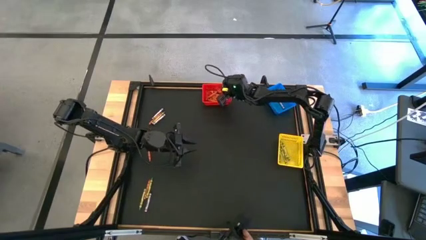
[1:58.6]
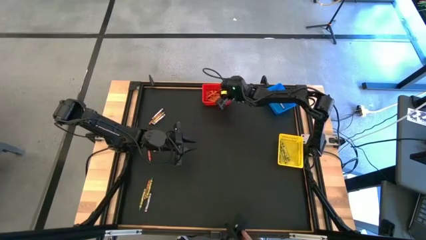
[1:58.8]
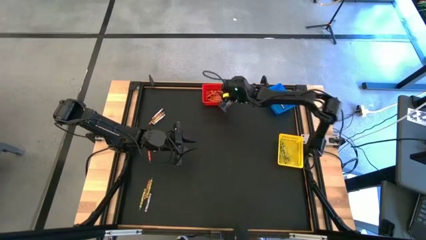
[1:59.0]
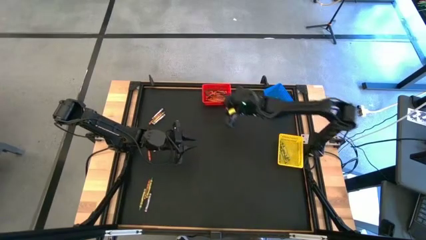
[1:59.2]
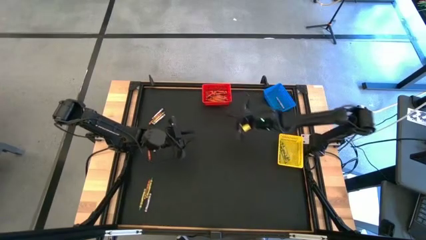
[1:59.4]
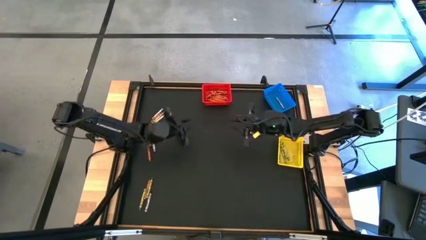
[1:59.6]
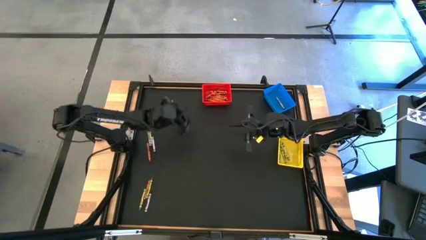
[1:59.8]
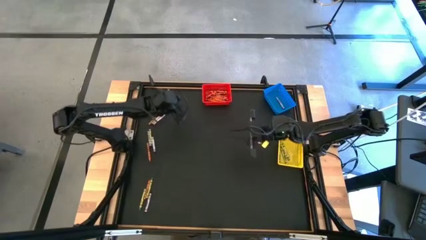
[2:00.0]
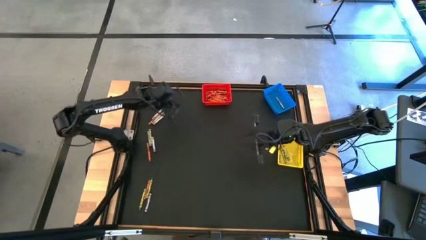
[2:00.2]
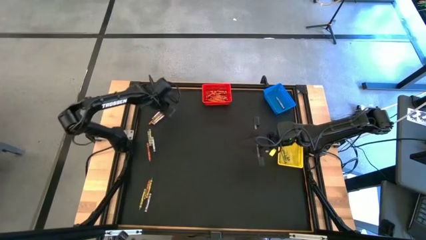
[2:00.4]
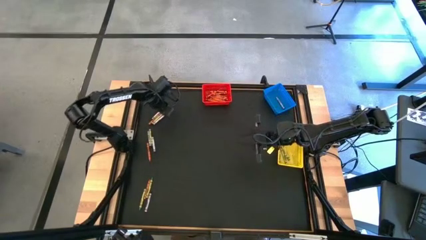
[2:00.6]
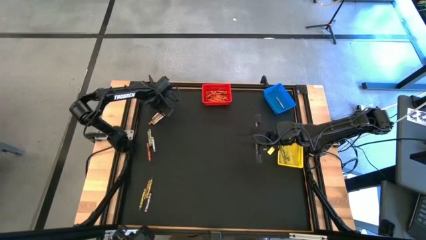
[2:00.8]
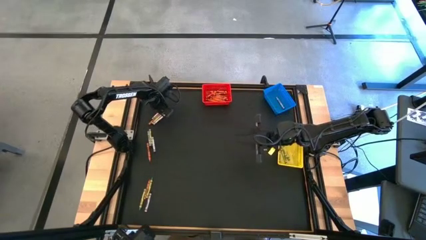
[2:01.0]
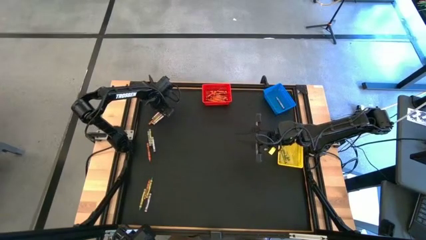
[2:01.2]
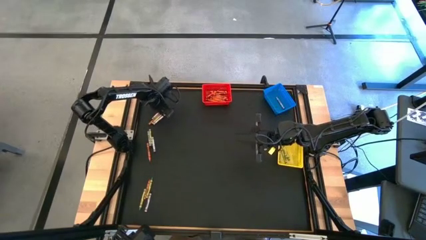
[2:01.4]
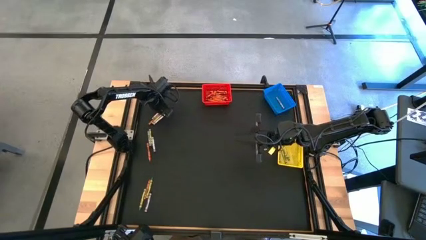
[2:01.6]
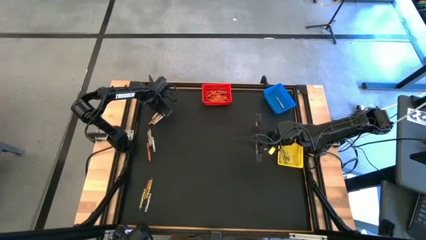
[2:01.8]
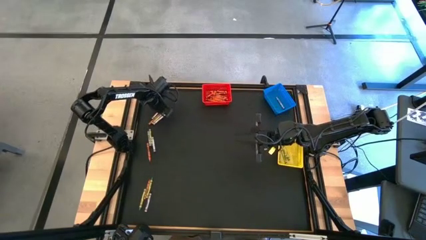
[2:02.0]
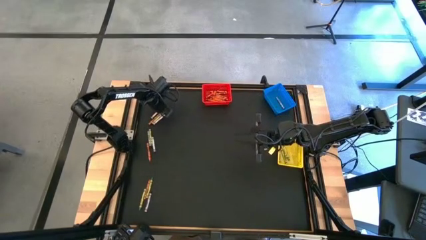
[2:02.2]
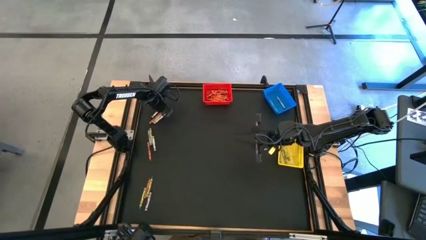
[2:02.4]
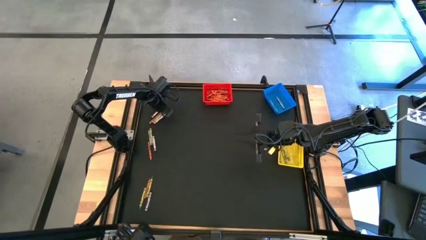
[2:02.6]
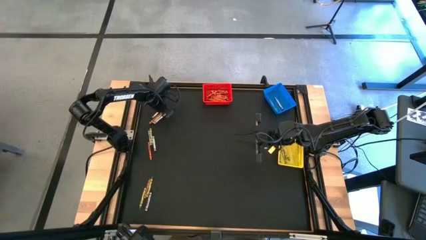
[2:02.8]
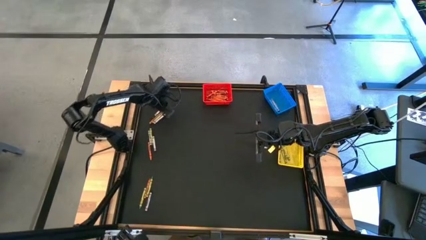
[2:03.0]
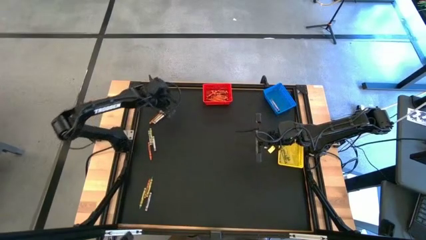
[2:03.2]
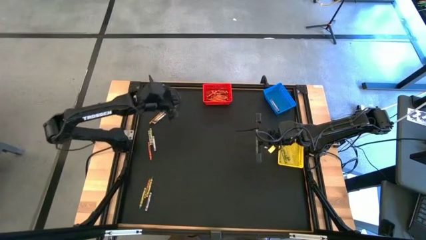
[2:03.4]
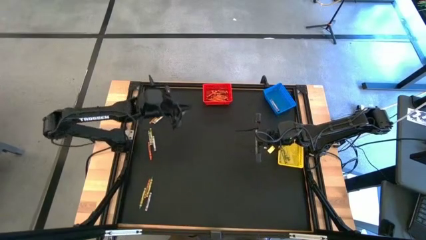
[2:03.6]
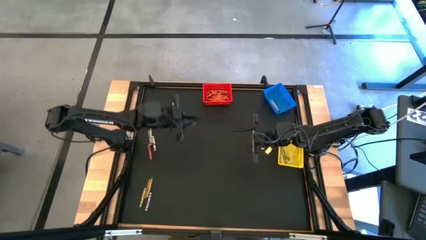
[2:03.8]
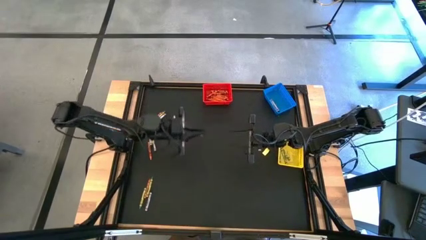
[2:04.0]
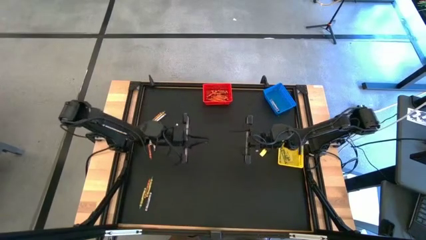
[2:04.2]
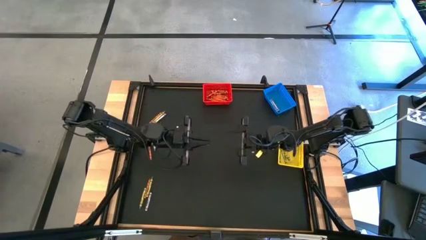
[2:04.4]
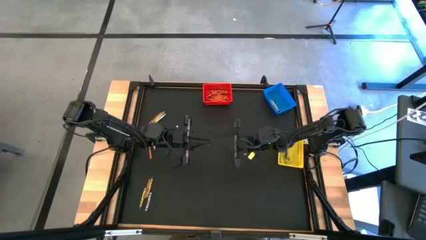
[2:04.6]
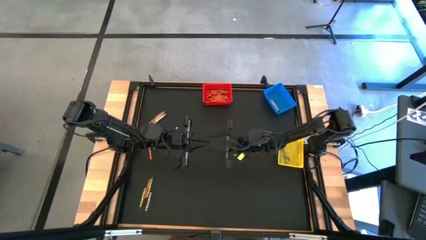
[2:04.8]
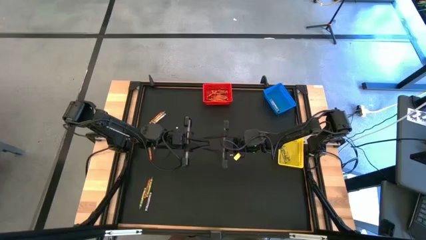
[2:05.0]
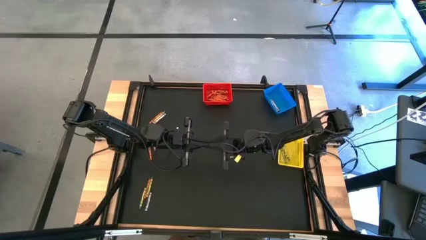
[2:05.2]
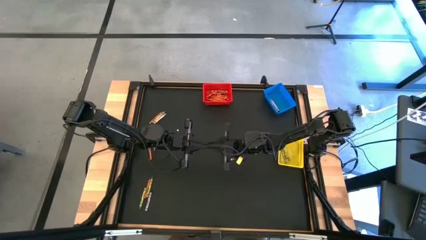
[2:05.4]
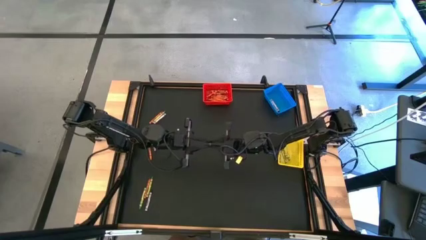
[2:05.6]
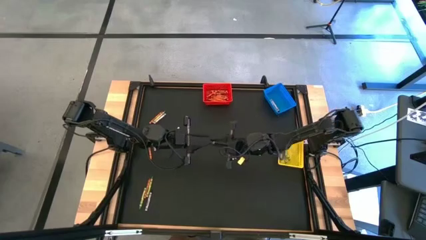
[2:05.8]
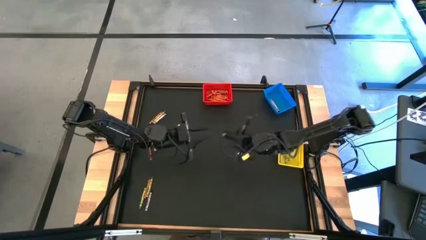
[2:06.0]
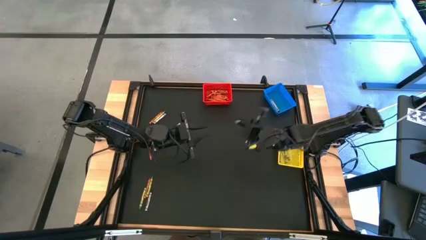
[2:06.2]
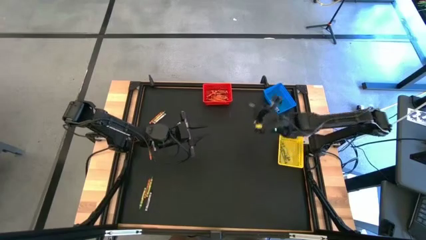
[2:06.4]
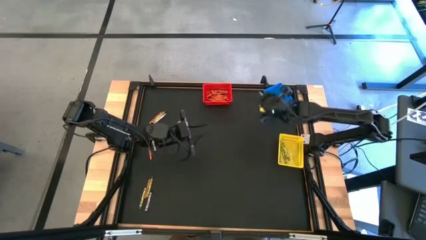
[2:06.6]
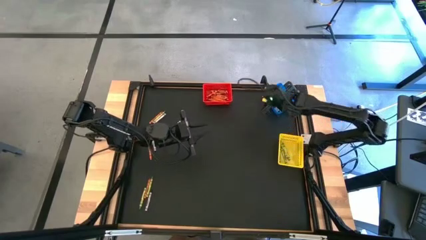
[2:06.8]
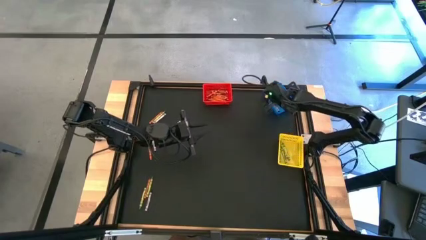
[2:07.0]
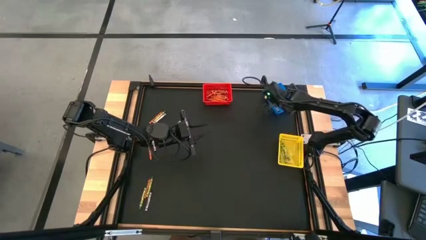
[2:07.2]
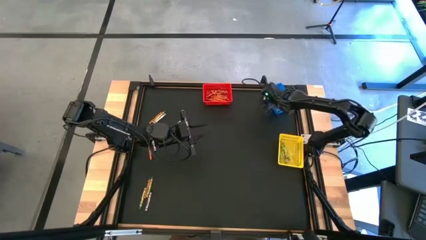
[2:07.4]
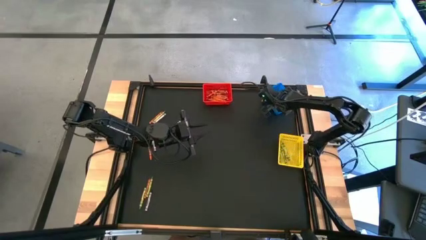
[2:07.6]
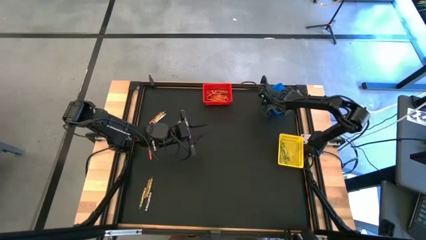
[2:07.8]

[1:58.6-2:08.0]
Task: Sort crayons
Put the black crayon into the blue bin

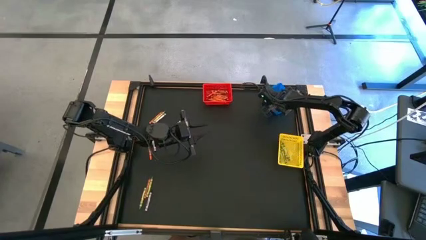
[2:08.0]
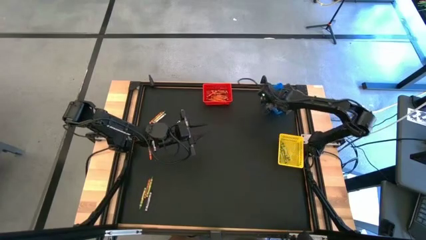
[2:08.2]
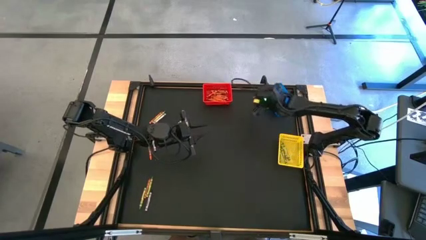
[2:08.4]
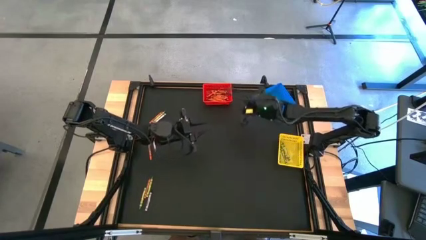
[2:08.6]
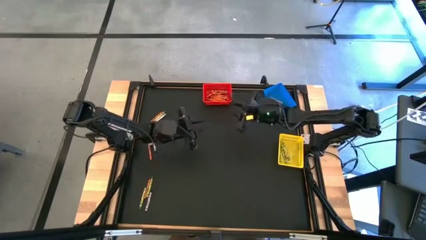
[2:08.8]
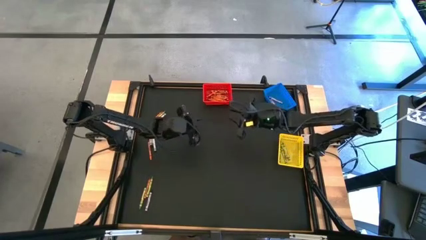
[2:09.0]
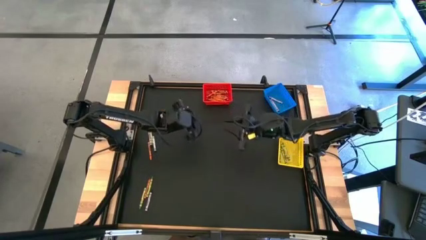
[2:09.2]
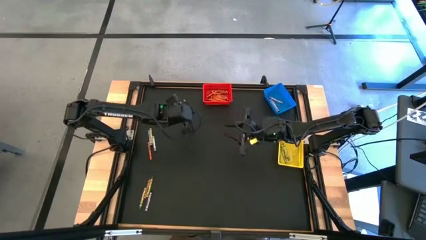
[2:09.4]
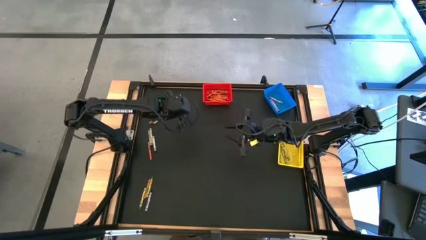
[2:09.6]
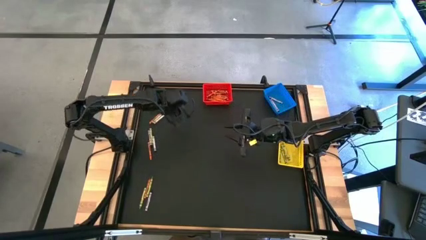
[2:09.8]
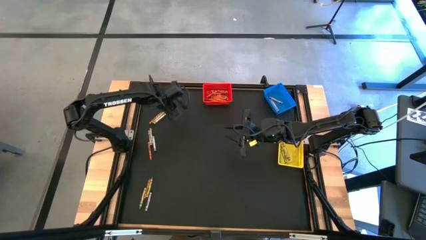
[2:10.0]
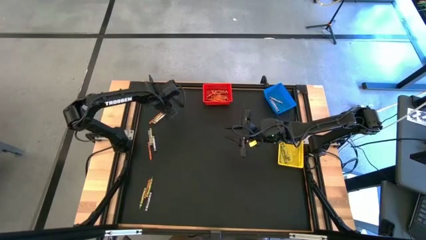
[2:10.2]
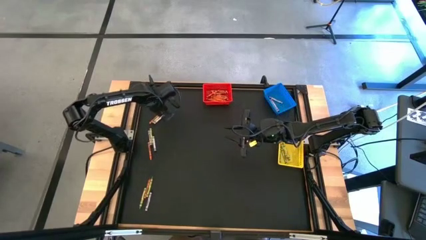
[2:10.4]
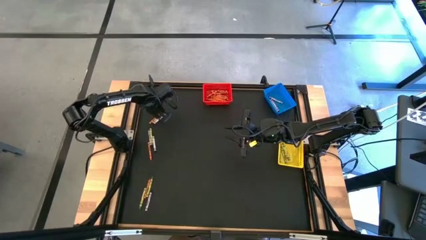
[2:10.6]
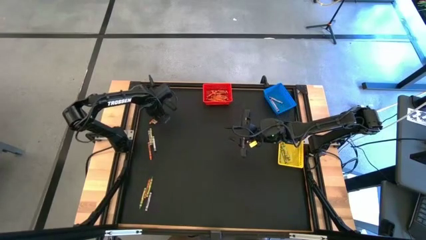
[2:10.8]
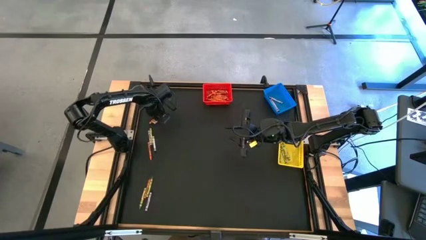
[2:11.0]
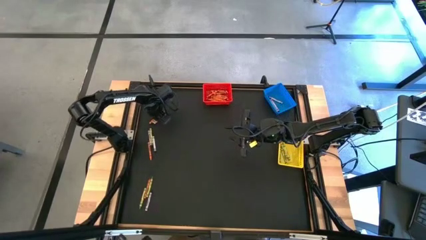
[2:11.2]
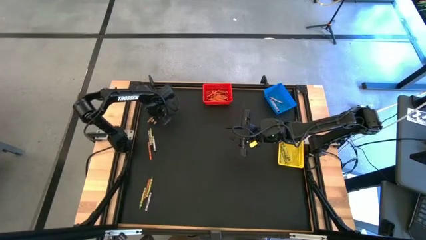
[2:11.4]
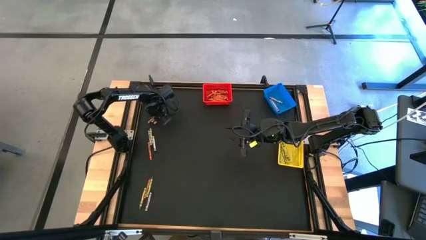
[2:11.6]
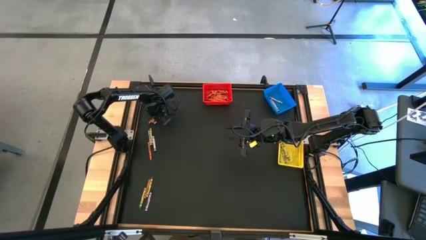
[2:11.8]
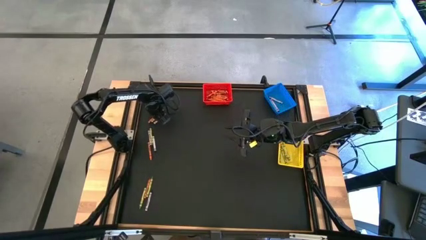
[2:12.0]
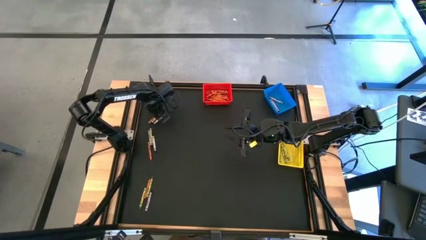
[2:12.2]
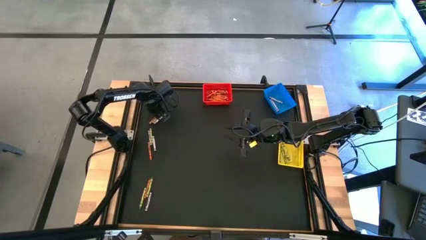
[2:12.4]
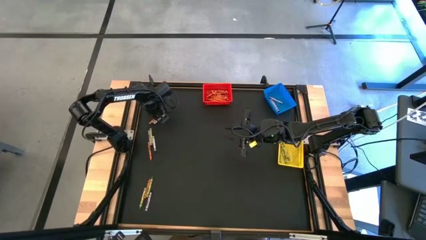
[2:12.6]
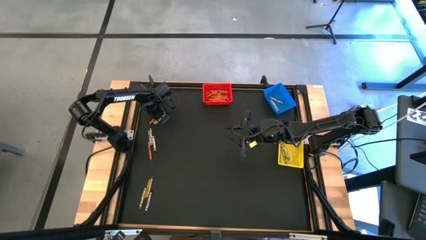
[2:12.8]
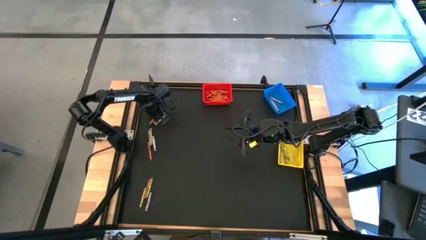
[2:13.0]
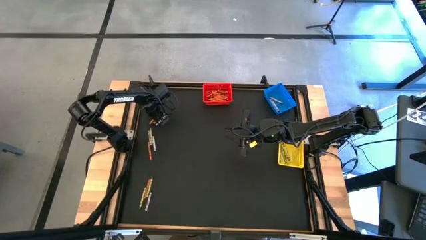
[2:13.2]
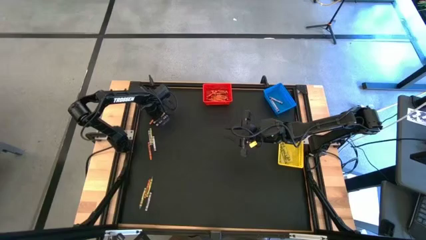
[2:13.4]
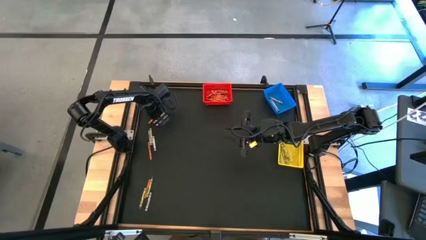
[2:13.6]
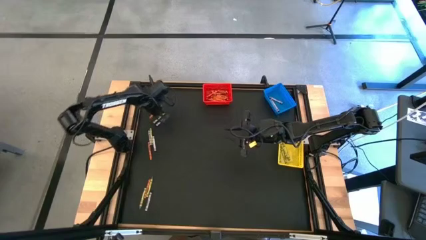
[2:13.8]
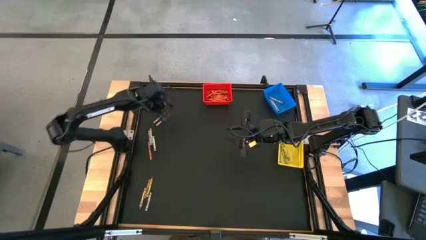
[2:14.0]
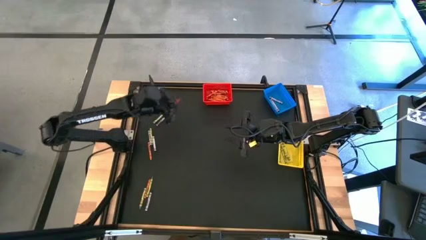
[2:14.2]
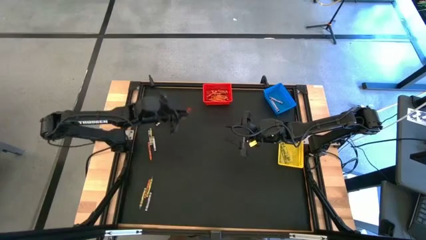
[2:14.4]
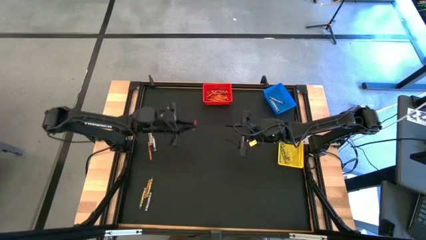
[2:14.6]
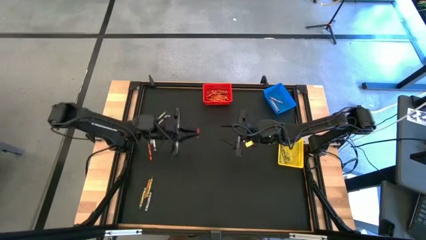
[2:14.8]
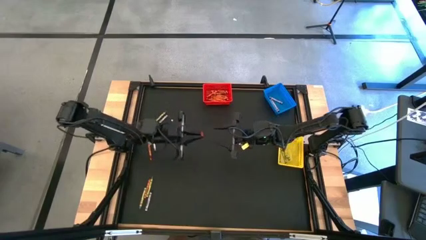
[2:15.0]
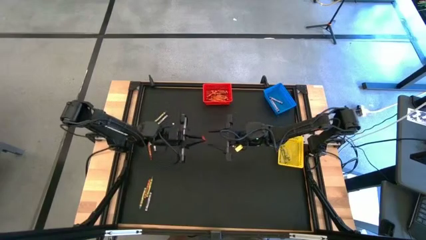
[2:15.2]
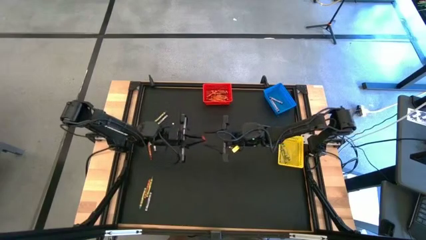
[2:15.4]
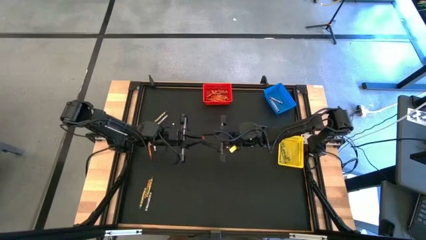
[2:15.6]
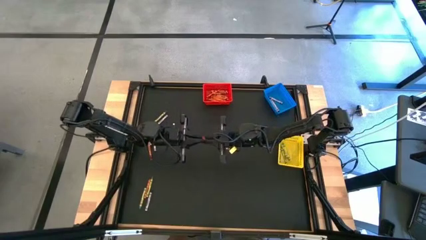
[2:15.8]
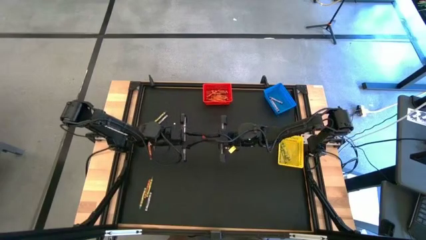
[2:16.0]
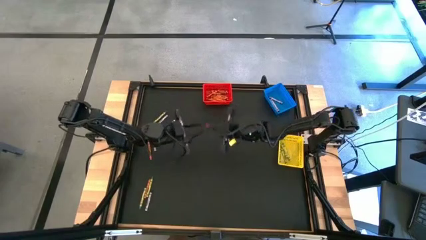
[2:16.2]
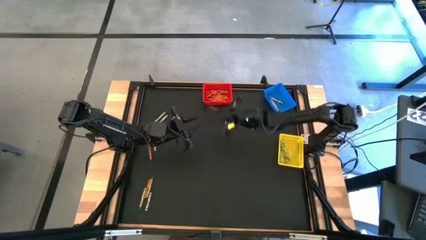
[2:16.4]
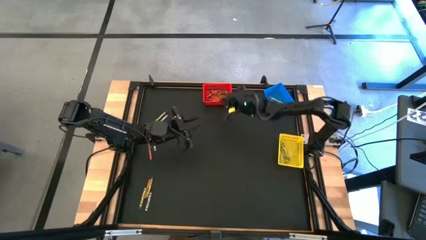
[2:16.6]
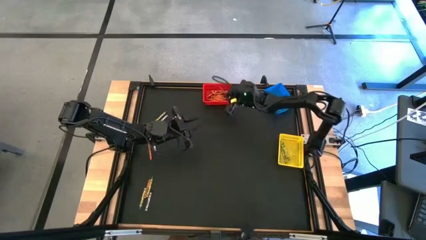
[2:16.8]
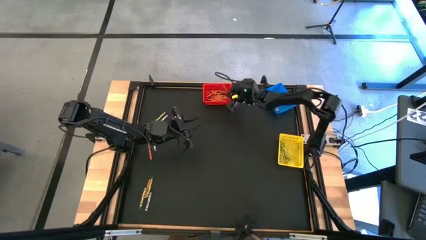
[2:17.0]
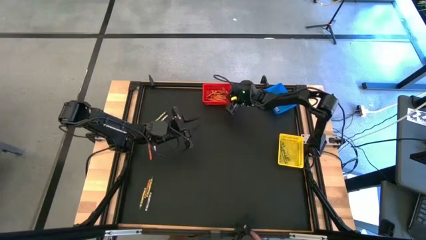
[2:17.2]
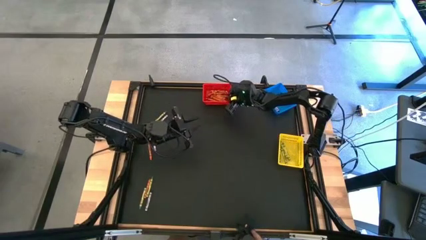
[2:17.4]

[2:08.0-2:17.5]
Put the orange crayon into the red bin
